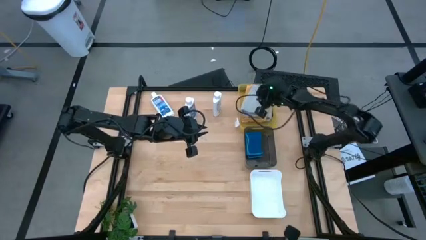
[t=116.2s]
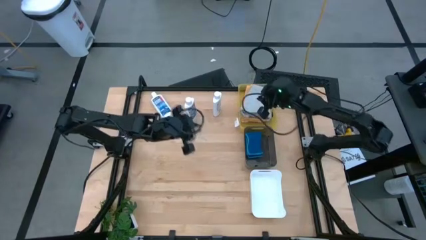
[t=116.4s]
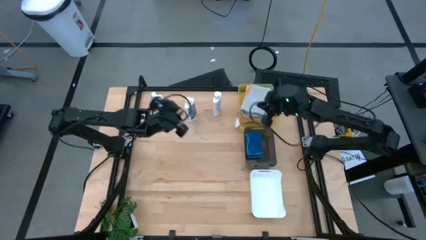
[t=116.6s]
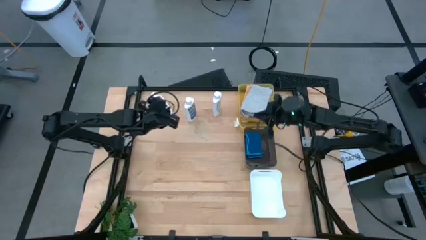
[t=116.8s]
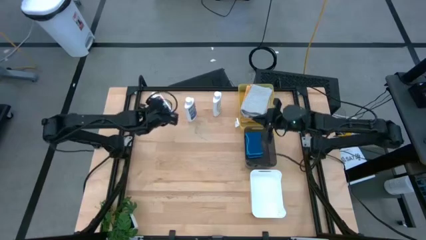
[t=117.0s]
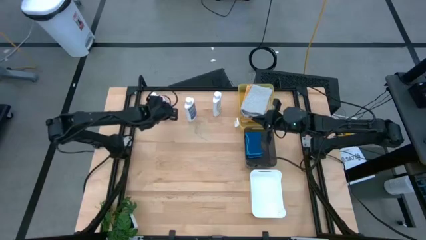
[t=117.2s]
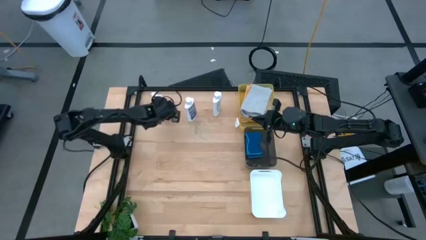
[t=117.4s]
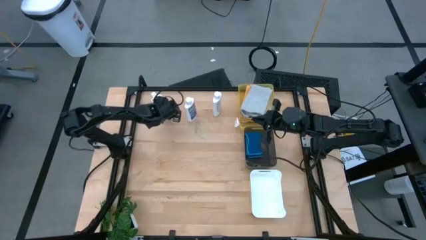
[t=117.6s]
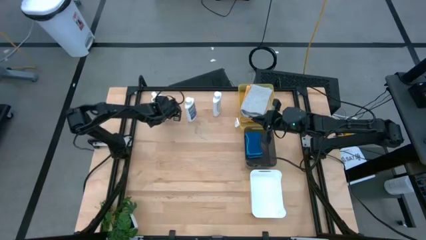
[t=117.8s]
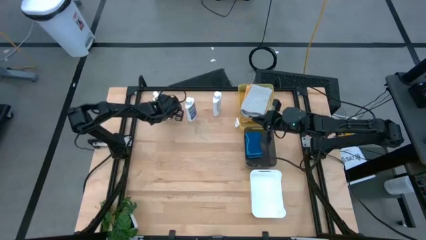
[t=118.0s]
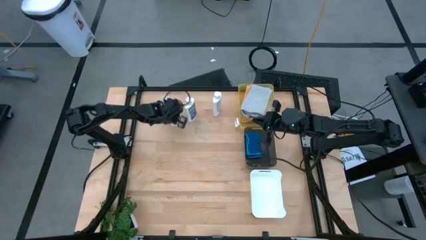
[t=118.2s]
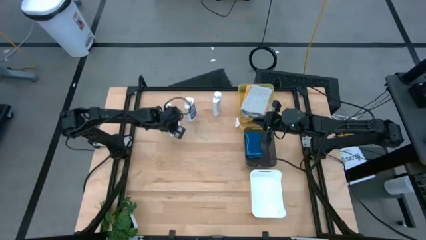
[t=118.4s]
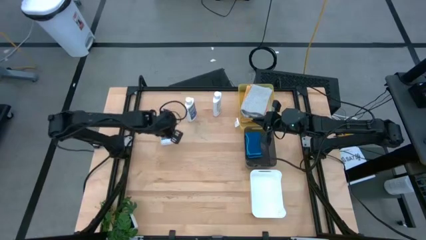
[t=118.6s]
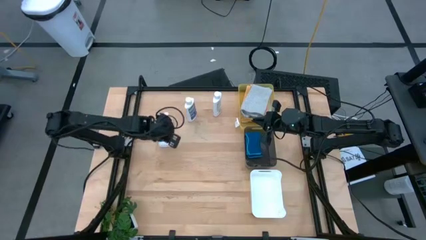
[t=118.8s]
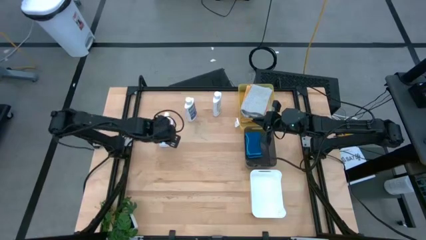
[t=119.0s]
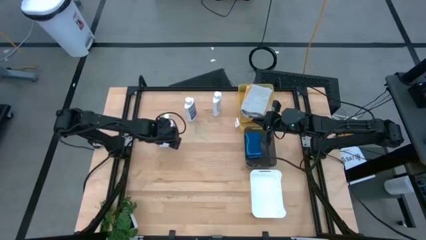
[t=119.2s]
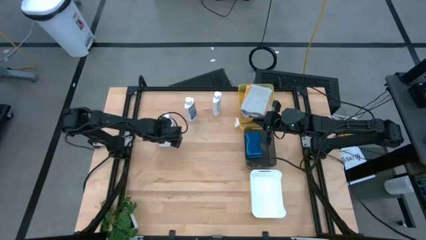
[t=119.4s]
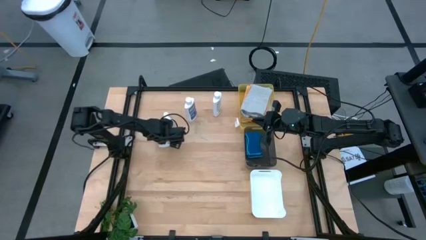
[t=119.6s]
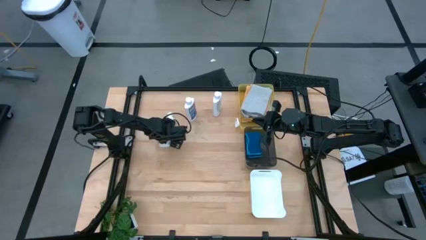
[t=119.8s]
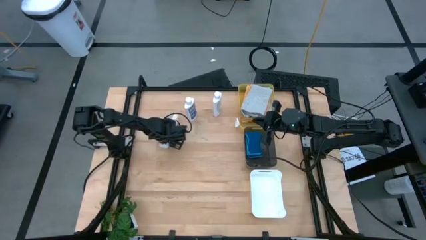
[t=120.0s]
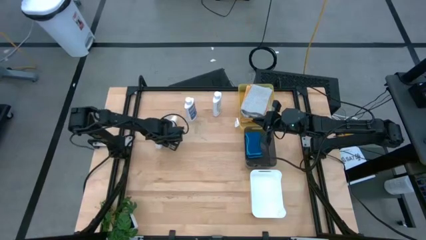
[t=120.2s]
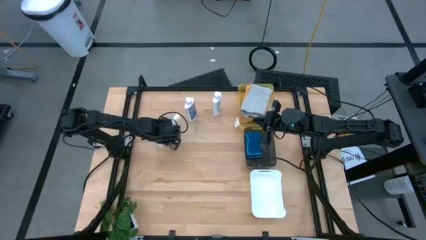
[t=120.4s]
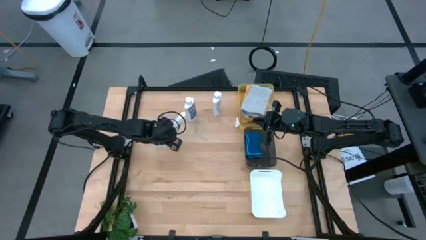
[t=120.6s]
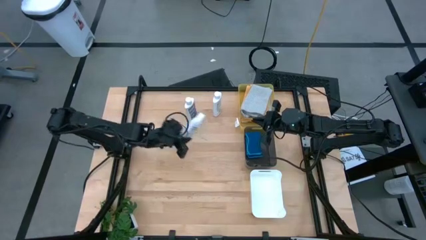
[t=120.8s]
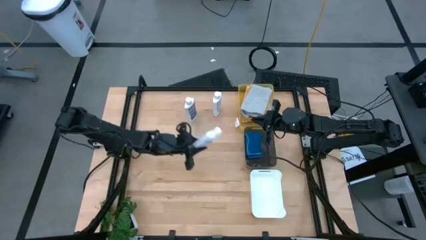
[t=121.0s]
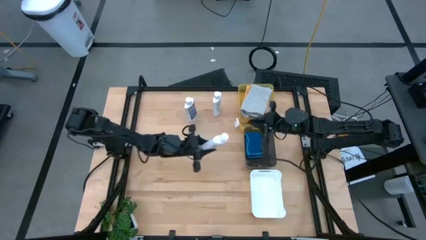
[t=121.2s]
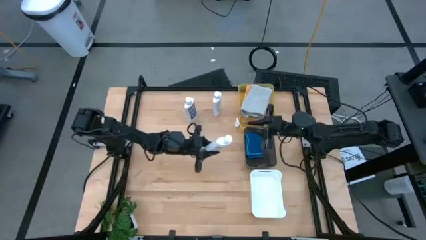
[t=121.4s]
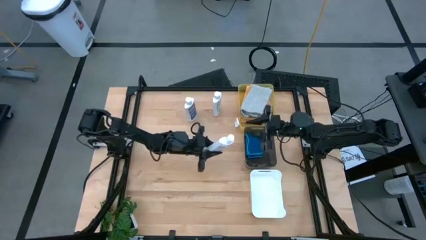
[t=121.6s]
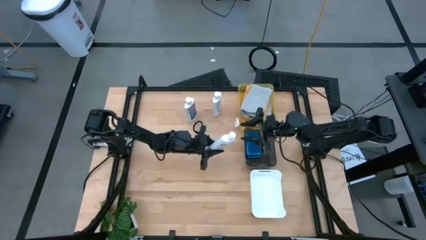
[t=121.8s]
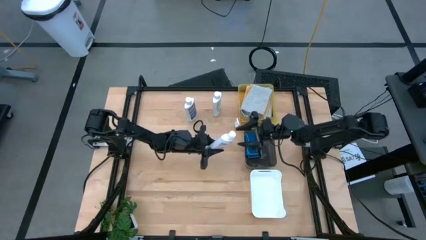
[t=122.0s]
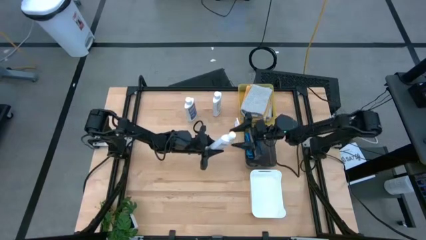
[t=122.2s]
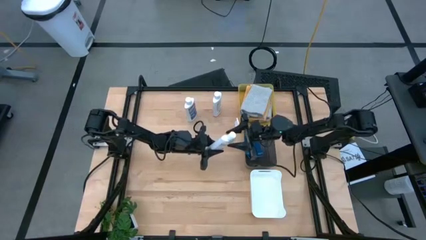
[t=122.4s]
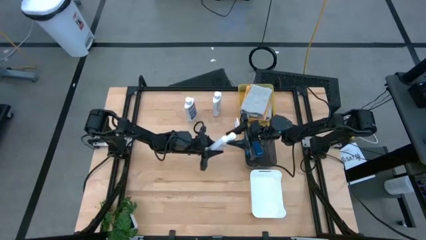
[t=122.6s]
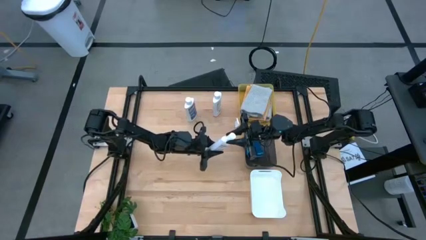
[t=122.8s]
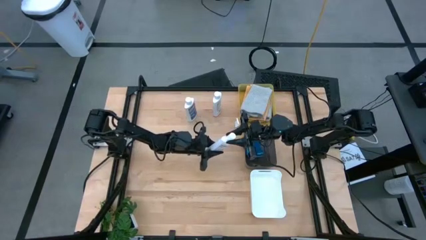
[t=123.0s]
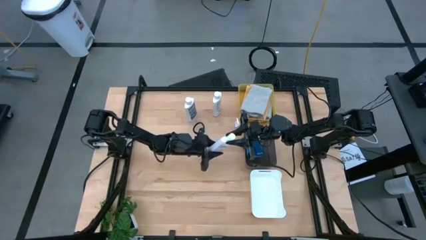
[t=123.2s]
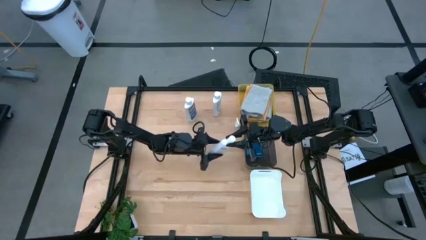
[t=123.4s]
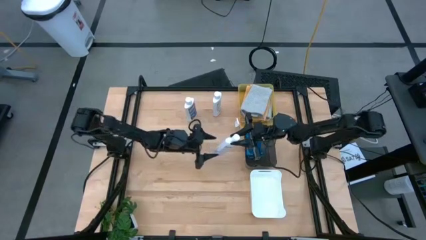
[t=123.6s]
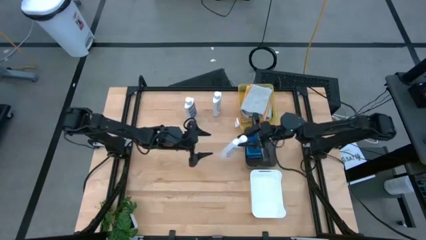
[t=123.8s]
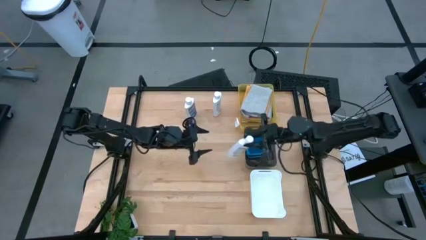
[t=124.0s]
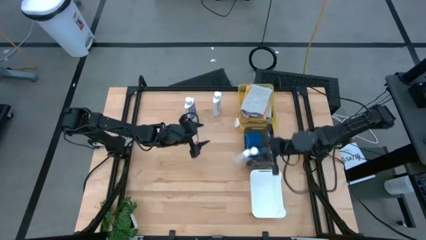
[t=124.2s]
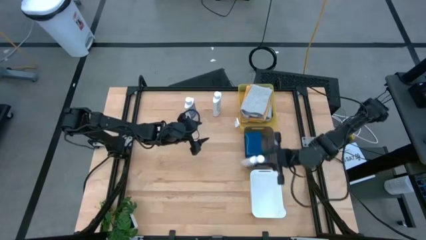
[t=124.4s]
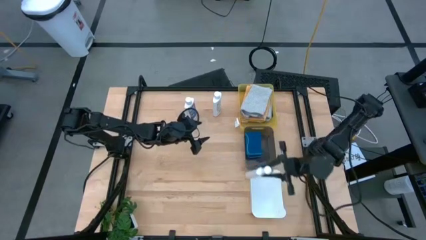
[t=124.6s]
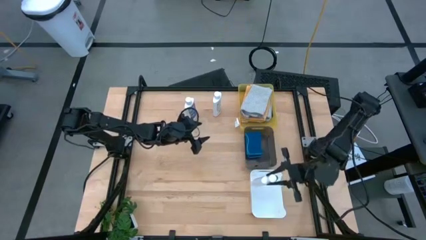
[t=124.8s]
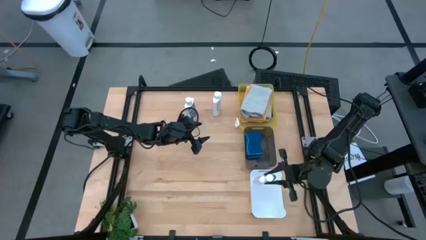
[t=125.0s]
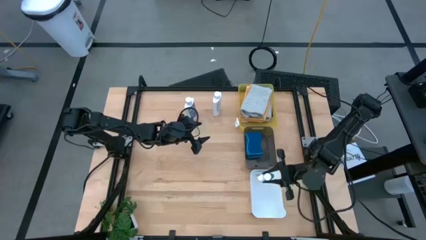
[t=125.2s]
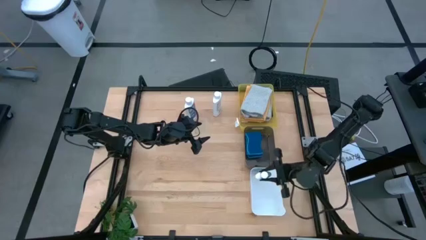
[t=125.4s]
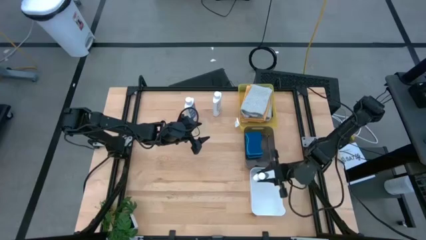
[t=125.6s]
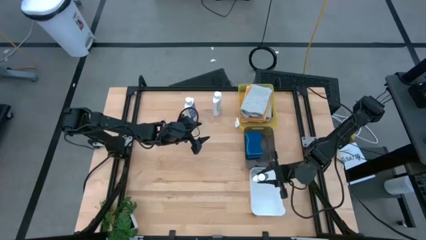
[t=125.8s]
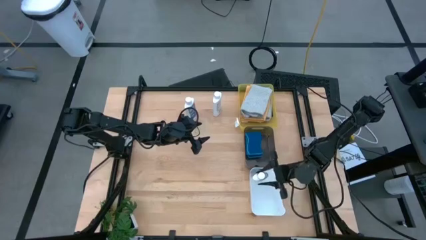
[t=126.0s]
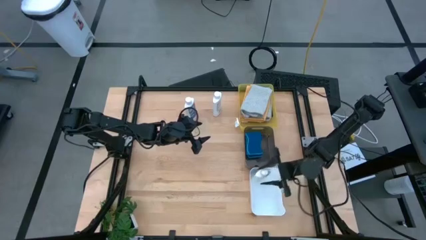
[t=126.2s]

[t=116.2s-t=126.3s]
Task: Pick & Place Kitchen Items
Put the left white plastic restorer bottle into the white bin

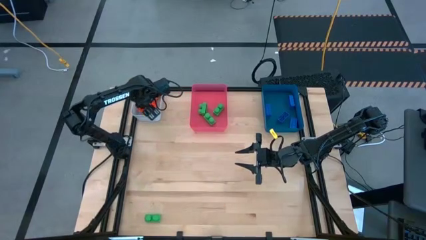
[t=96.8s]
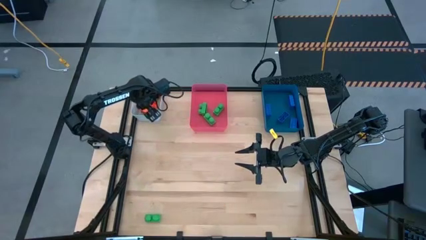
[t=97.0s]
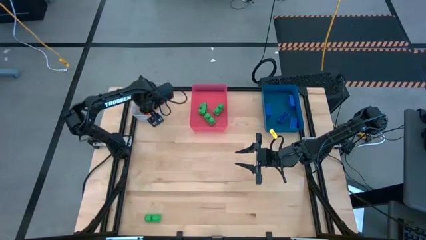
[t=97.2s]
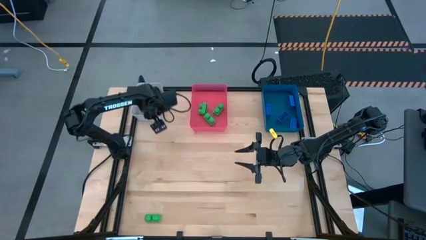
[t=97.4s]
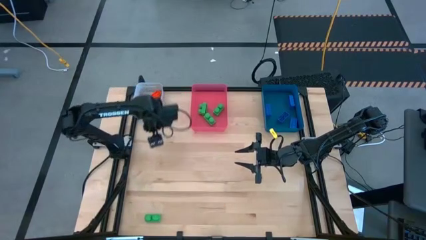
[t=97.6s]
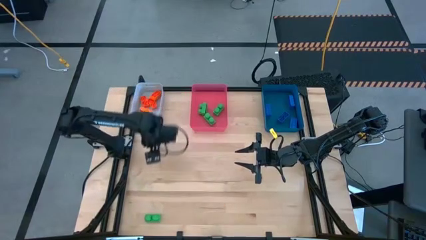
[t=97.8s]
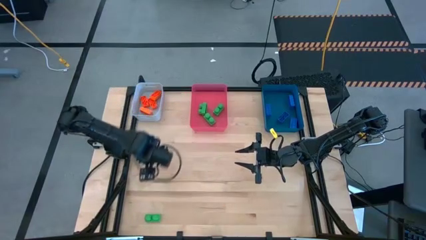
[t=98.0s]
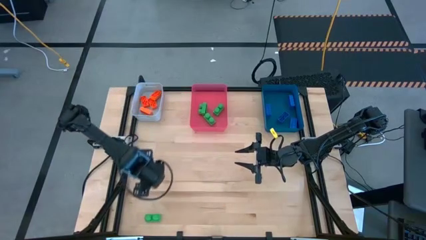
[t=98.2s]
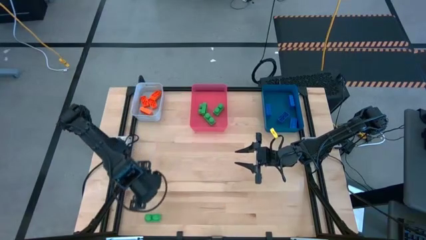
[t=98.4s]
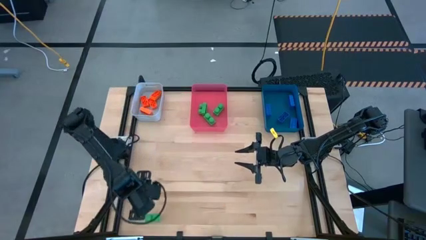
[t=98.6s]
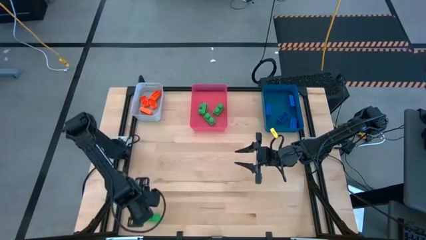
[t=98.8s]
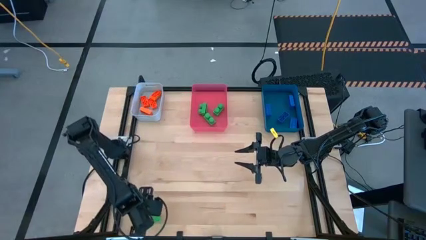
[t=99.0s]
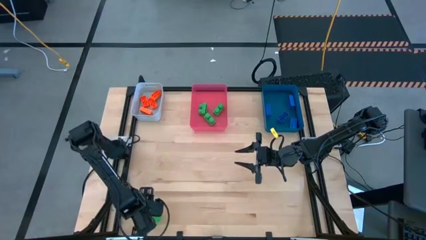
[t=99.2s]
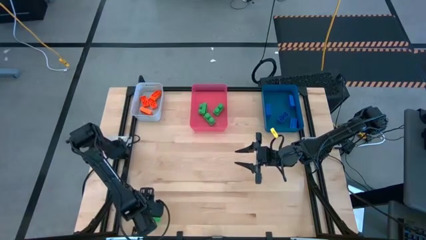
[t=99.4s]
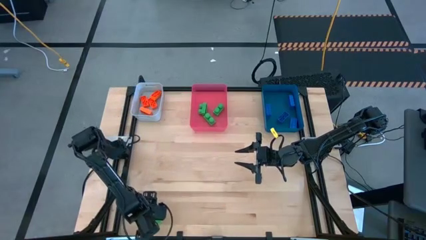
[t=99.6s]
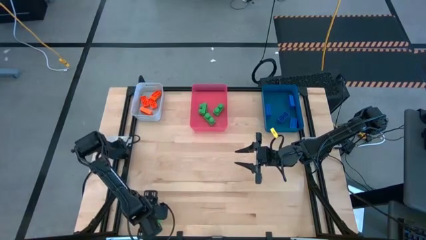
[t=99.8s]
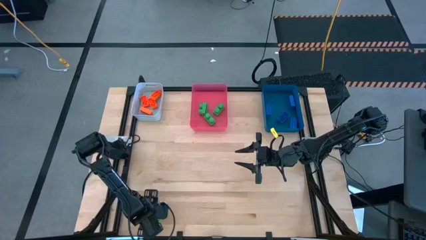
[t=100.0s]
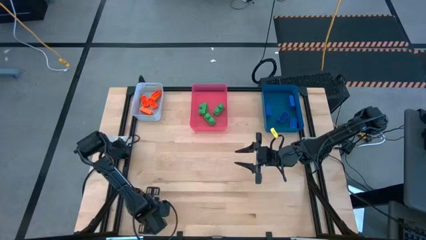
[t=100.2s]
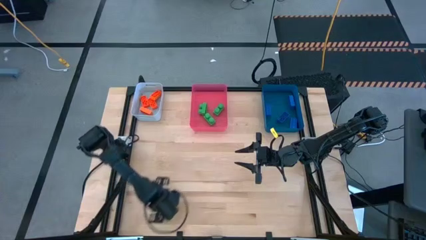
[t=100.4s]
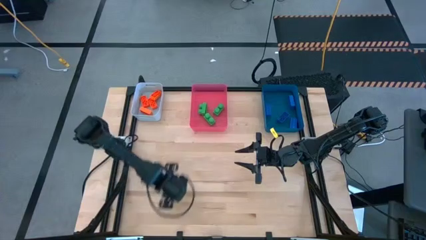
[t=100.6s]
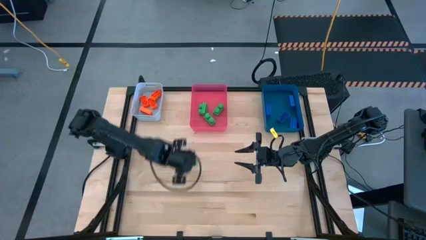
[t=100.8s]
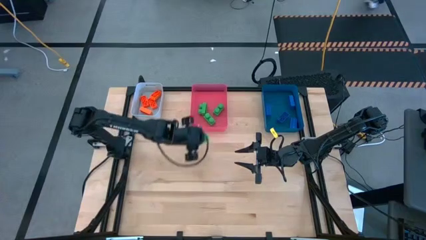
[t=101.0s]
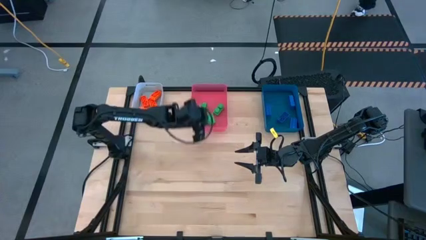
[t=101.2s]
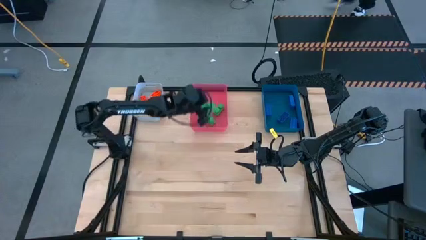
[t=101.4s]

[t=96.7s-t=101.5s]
Task: Sort & place blocks by color
Put the green game piece into the pink bin
